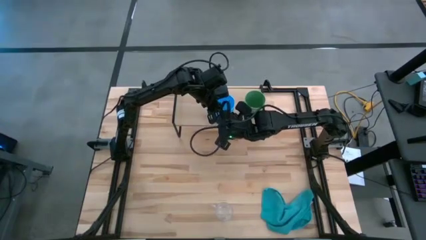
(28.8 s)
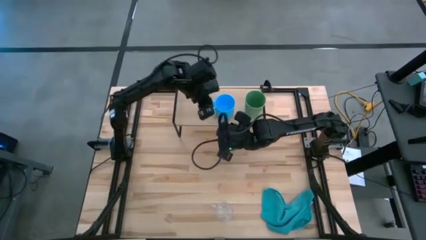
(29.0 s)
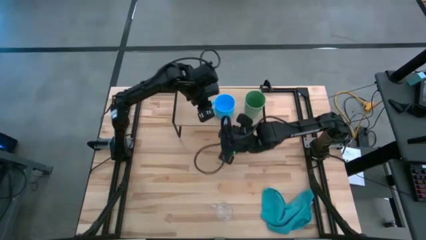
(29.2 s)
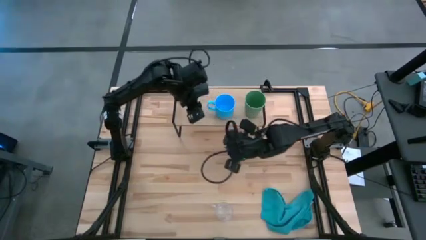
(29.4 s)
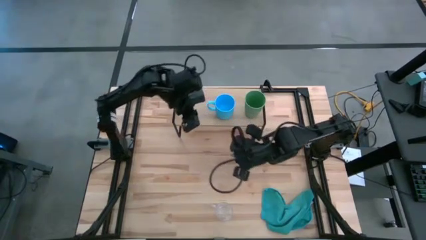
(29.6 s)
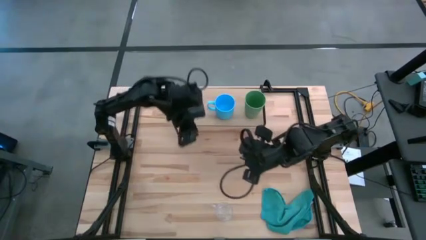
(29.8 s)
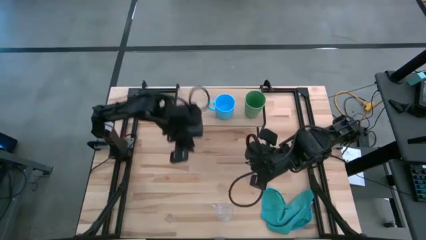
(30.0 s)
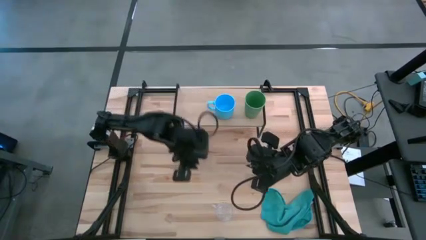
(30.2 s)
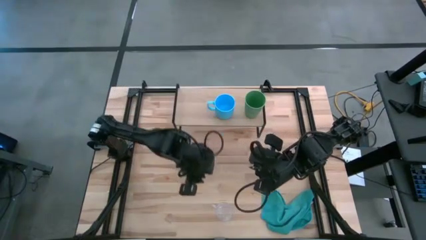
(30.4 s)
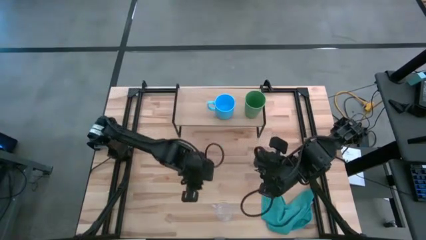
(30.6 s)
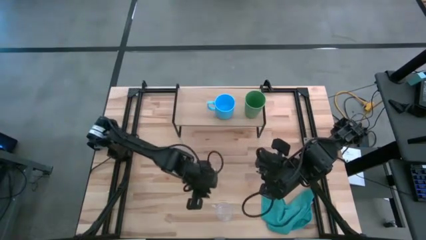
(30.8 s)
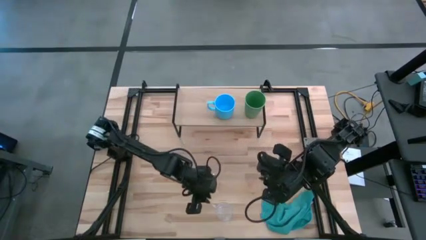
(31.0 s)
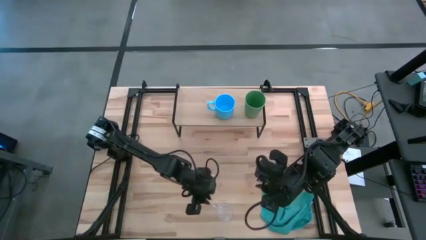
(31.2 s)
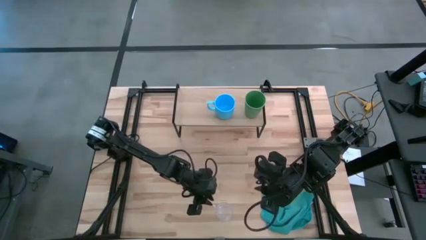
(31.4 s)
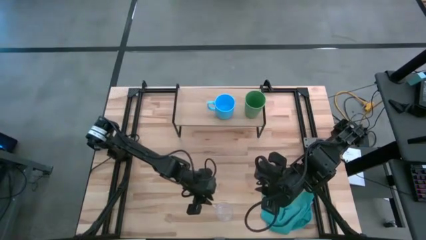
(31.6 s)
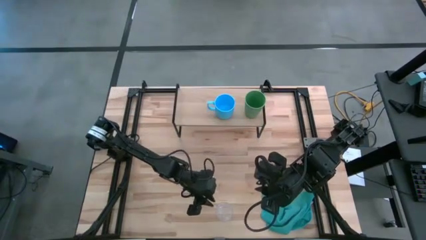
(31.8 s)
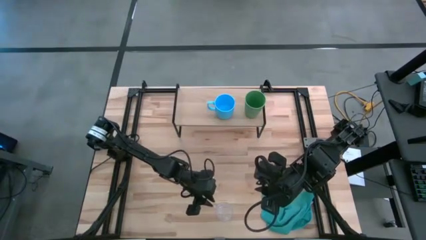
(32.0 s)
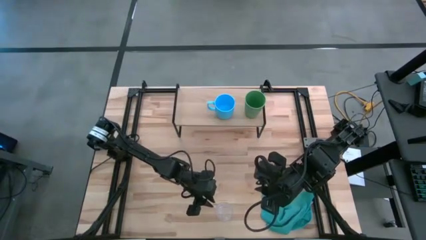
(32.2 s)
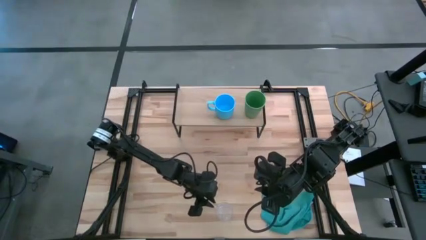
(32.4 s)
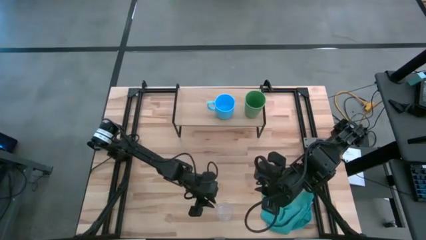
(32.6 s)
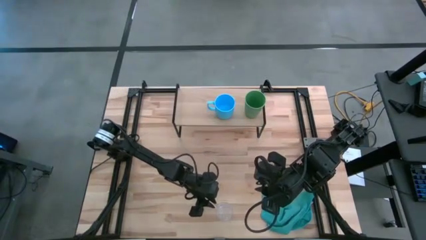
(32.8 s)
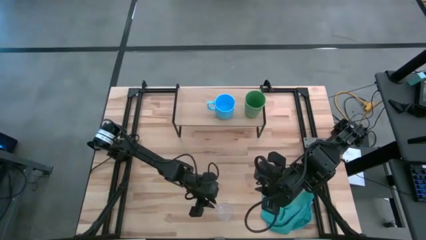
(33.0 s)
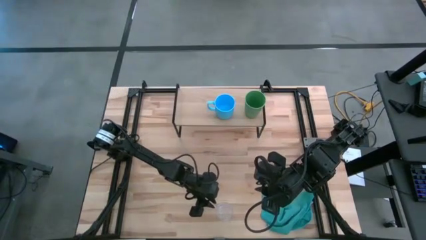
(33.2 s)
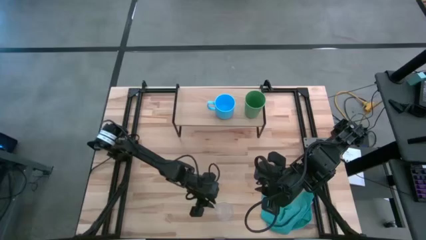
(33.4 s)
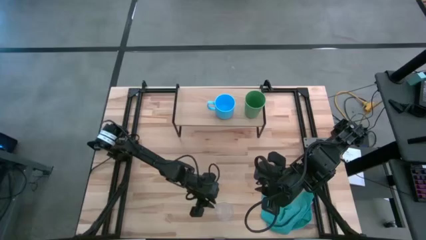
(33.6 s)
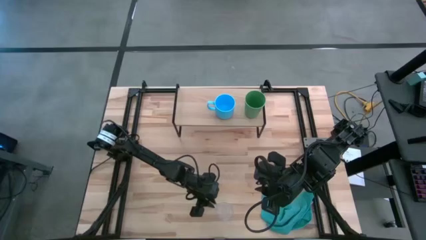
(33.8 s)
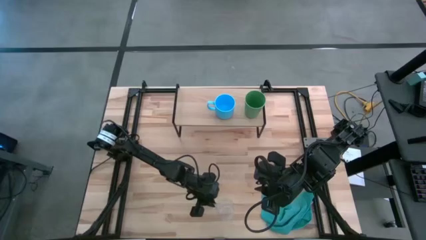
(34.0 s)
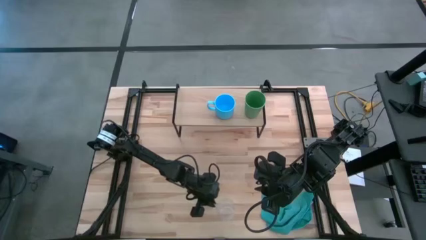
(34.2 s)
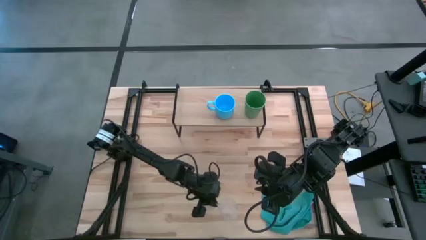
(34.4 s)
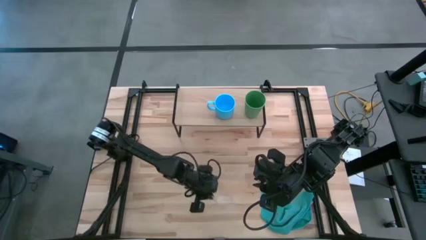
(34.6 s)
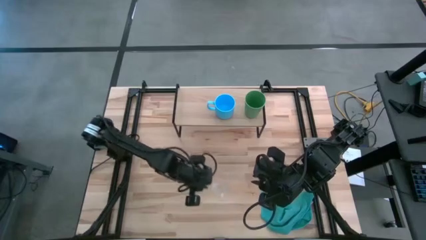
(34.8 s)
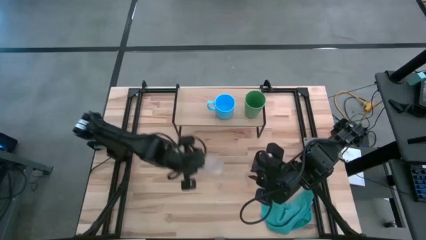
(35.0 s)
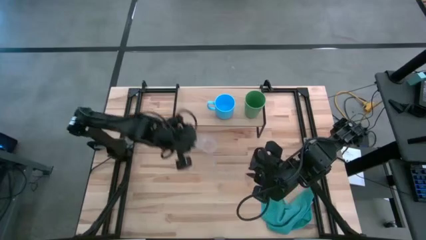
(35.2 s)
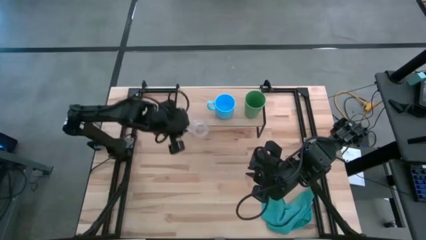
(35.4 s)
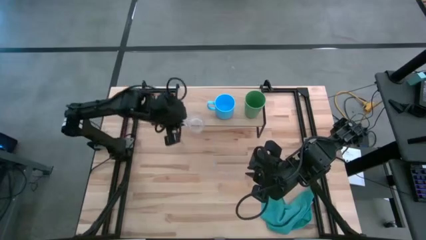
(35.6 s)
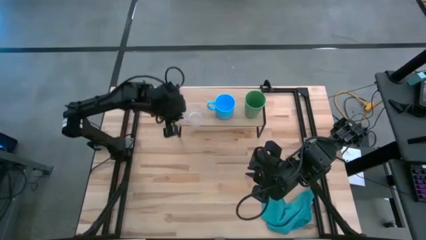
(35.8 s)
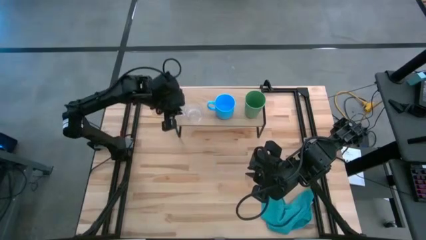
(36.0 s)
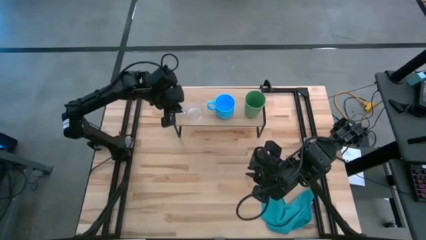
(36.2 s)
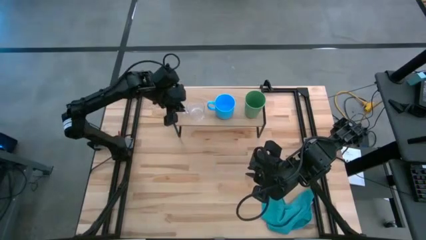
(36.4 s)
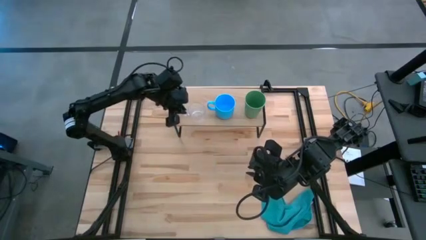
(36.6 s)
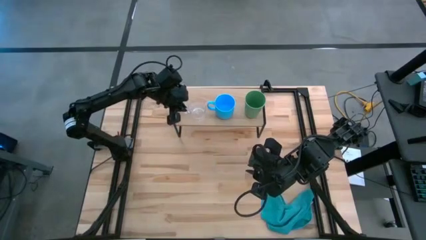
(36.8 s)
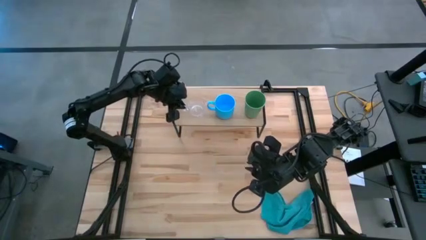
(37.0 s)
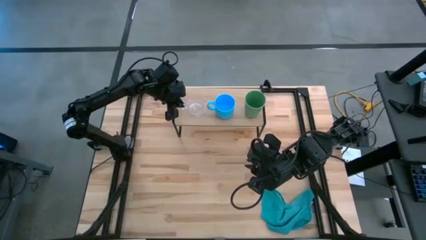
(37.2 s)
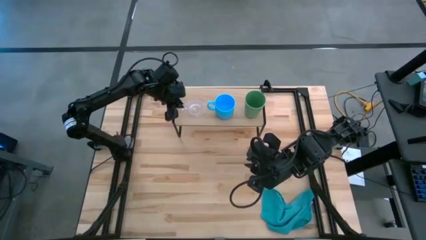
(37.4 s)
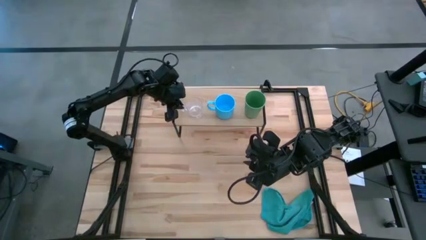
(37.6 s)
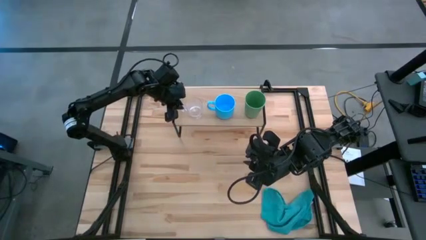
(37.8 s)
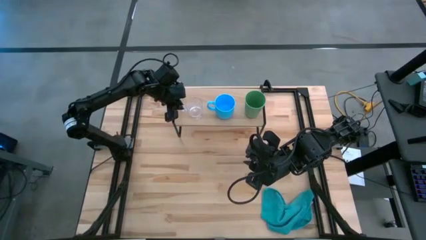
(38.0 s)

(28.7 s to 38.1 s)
Task: Stack small to large cups/mugs on shelf
Put the transparent mug on the shelf

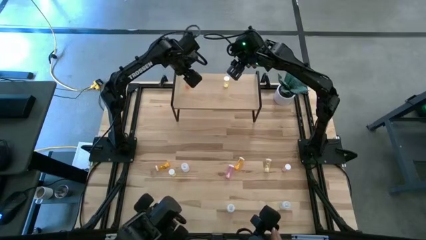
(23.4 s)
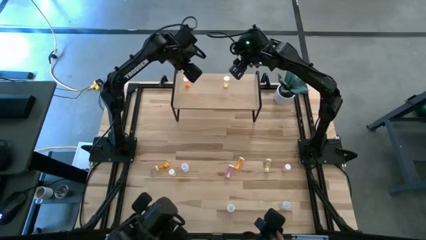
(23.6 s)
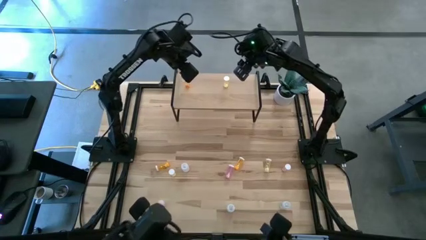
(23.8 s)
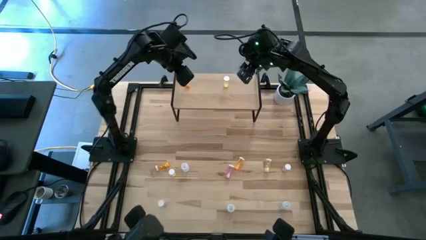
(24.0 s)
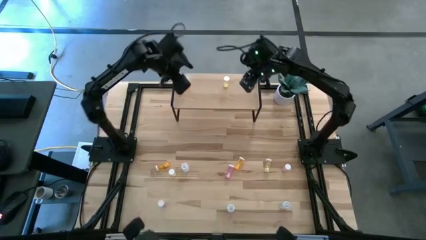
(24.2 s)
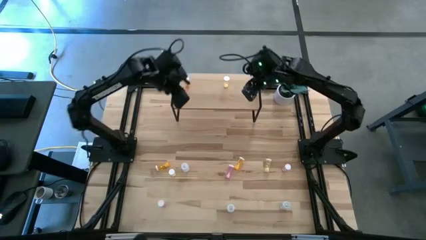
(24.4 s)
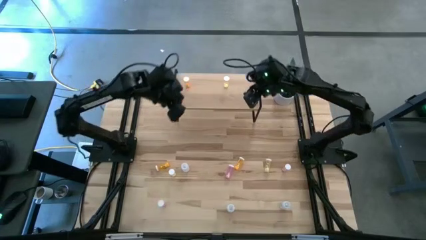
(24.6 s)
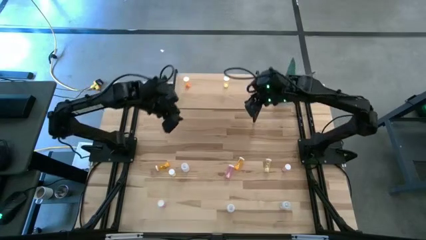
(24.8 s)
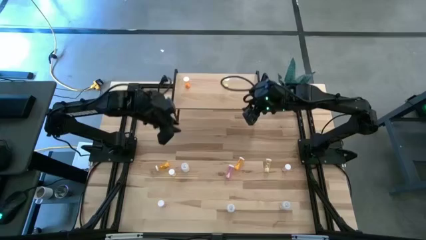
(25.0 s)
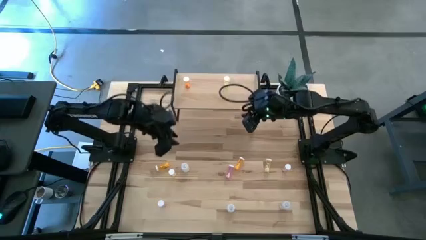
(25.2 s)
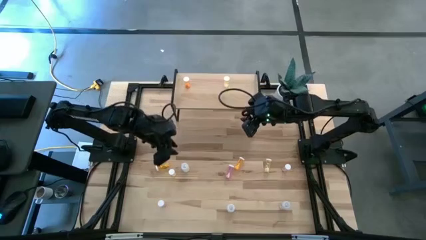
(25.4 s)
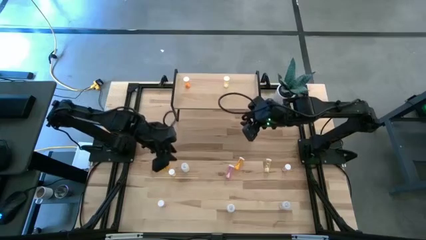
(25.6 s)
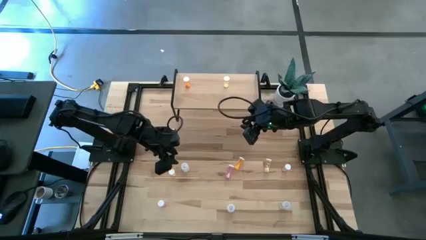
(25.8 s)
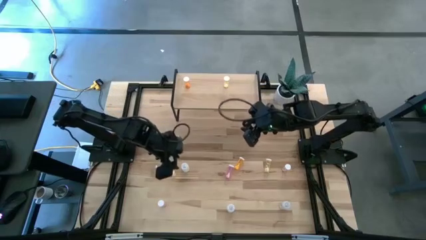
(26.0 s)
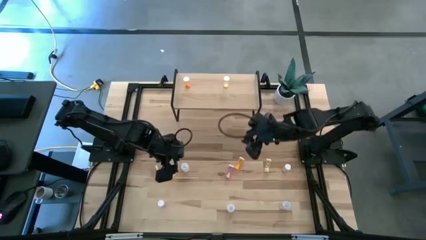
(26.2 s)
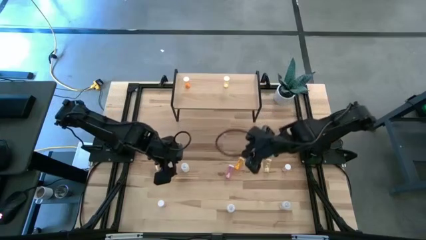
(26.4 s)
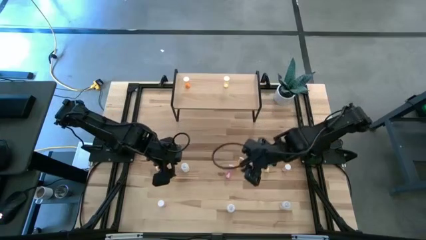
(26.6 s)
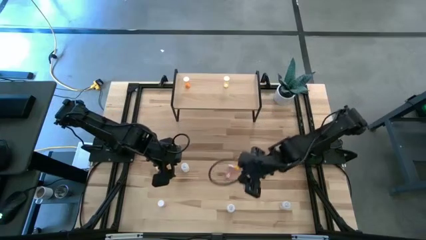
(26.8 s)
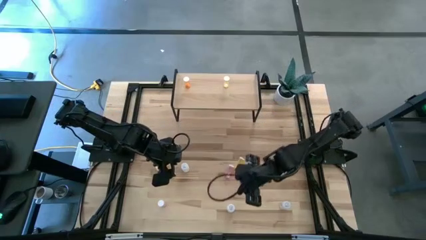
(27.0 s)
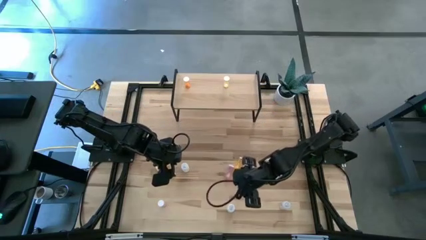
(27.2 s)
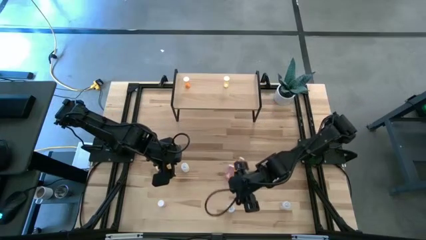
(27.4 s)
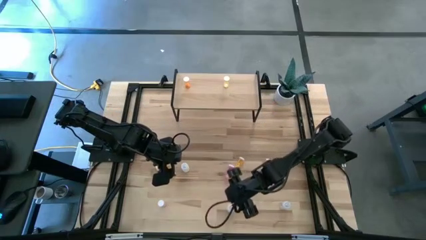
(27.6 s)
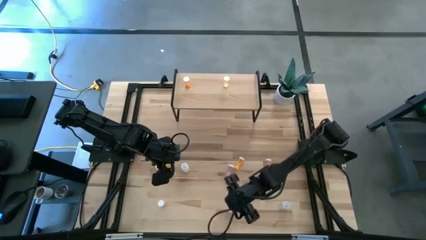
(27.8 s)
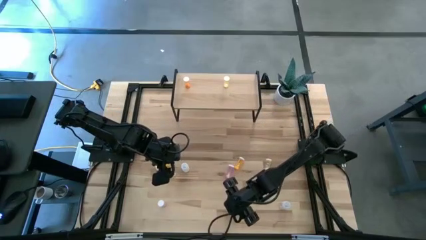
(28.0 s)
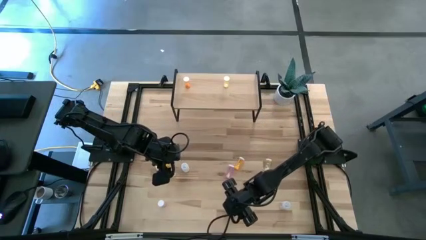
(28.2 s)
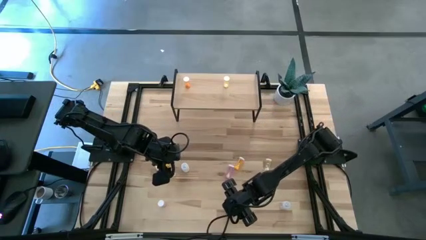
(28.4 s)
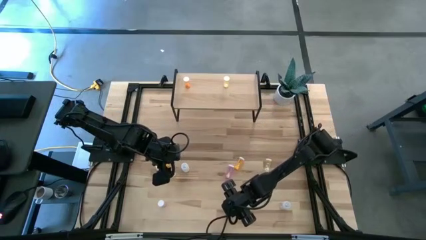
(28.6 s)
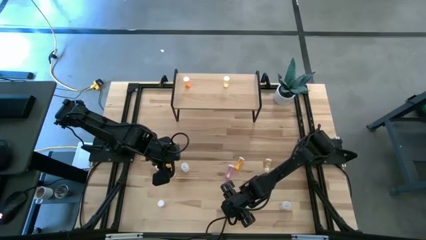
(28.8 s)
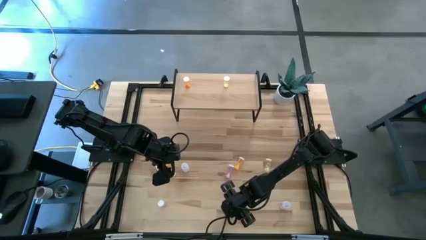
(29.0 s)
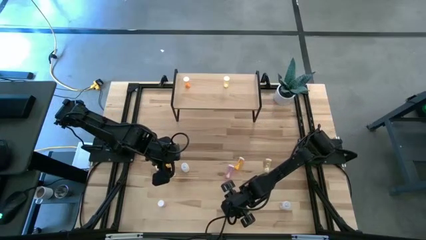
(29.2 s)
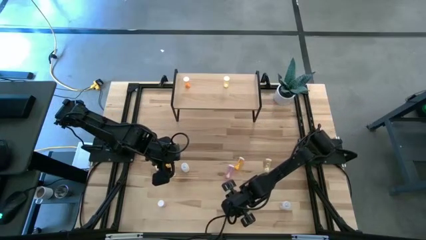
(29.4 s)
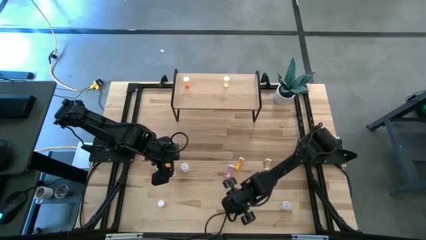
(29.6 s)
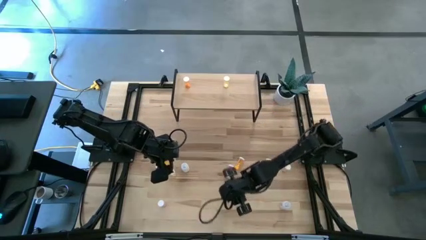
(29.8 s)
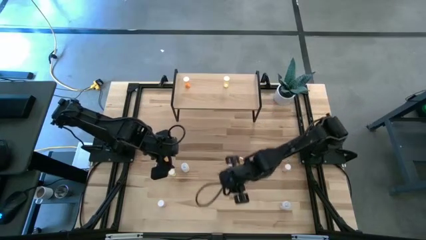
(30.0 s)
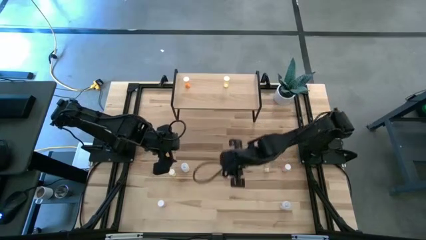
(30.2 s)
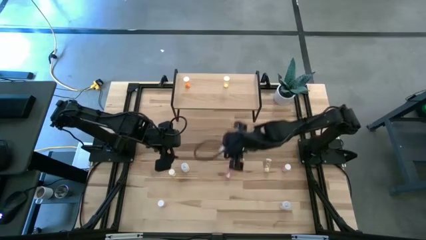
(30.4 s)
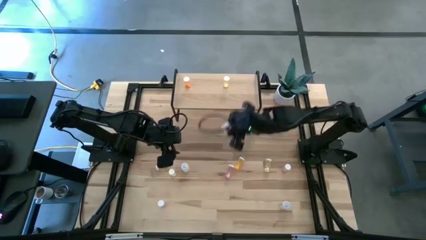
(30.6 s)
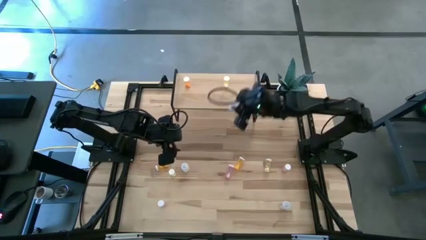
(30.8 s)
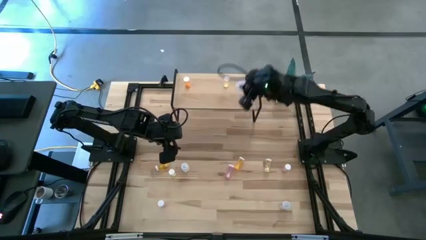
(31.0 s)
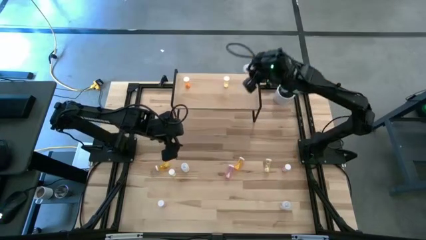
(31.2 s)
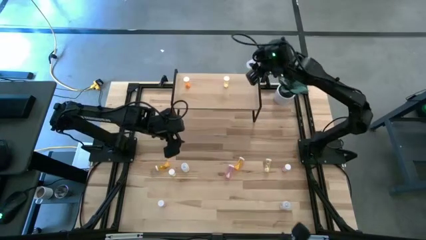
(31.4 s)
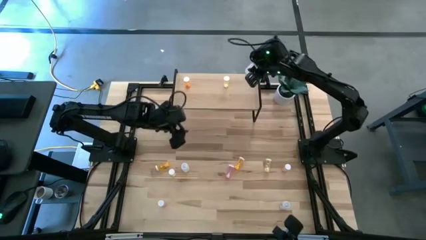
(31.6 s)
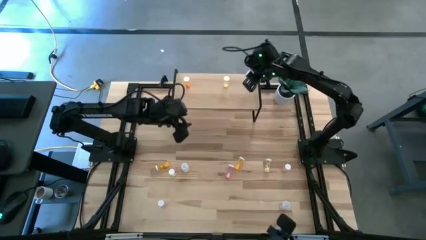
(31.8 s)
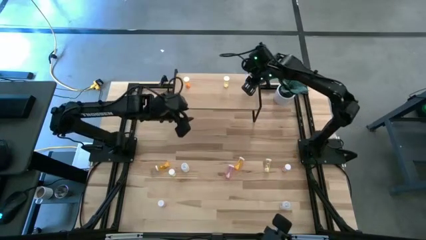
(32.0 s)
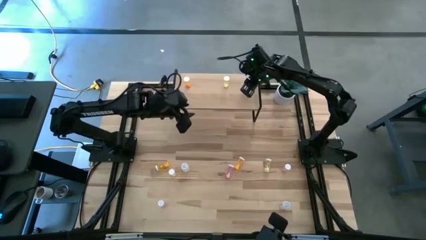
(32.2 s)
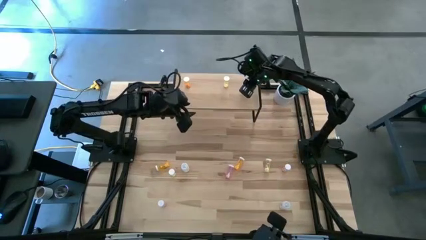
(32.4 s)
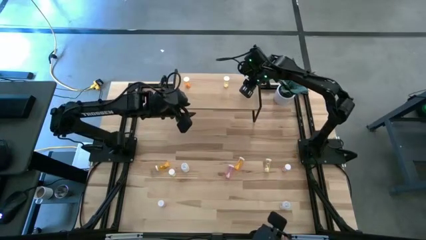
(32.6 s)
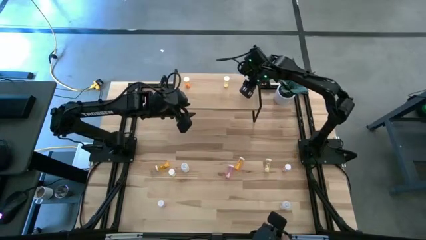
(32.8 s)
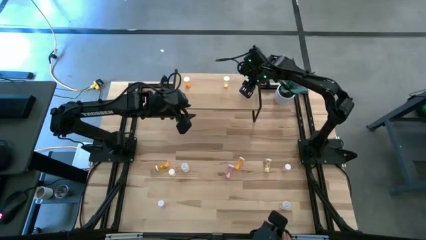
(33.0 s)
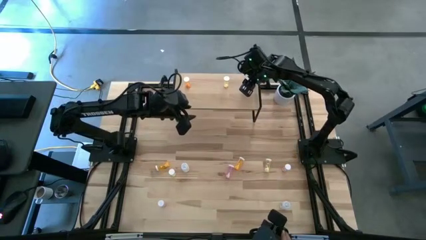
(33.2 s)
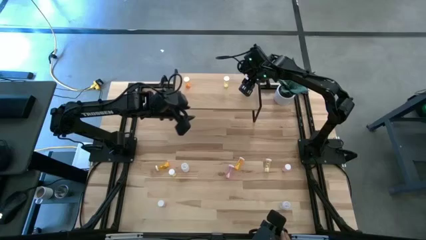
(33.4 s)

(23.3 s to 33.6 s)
Task: Pick and place medicine bottles onto shelf by color
Put the center white pill bottle on the shelf
